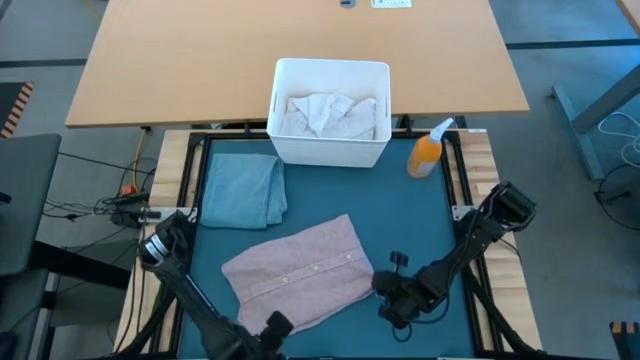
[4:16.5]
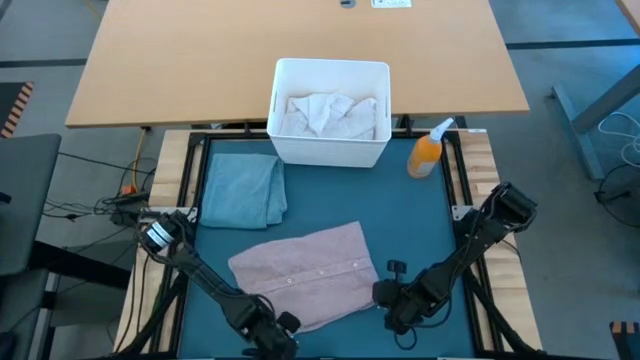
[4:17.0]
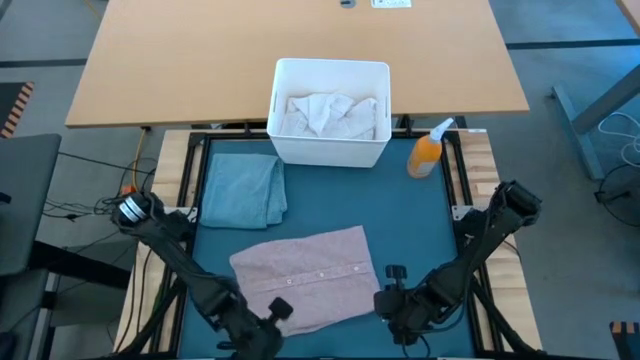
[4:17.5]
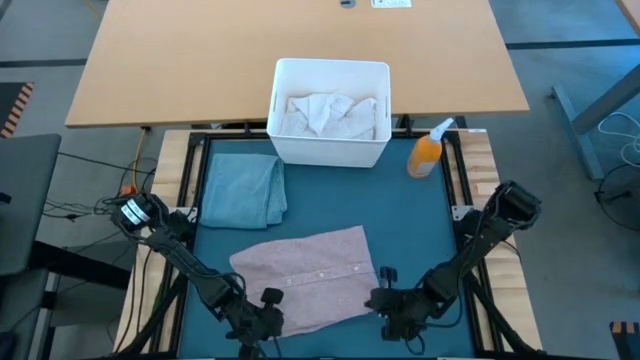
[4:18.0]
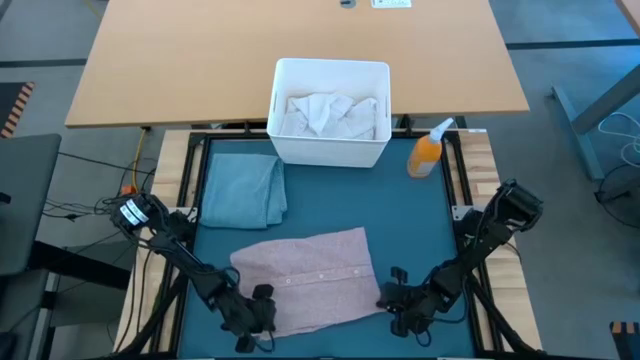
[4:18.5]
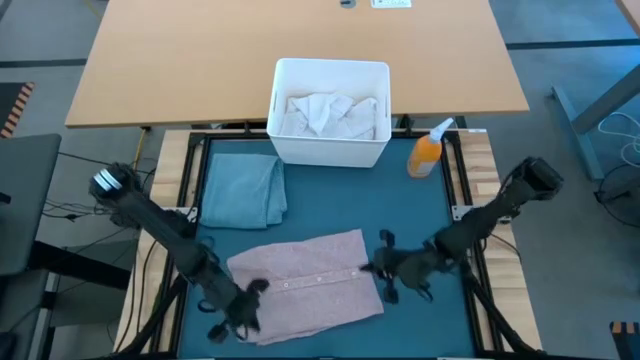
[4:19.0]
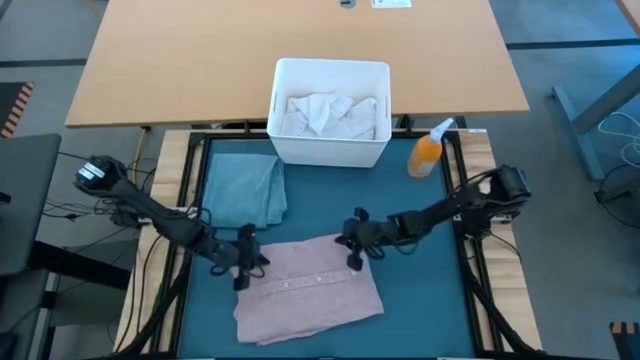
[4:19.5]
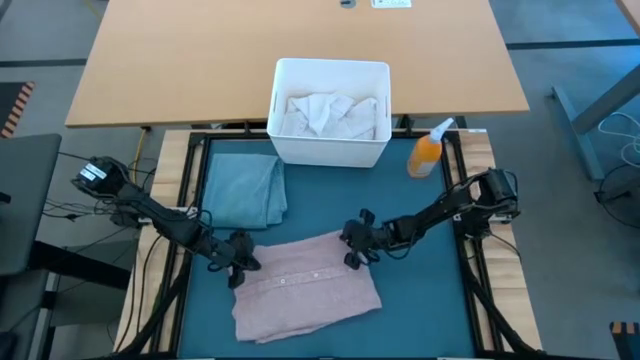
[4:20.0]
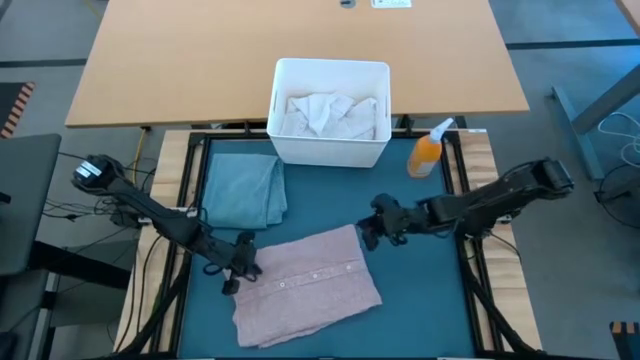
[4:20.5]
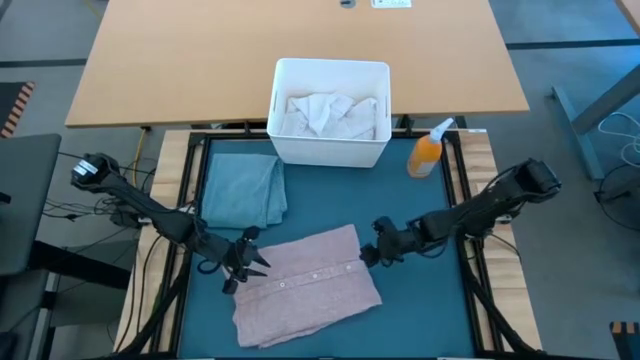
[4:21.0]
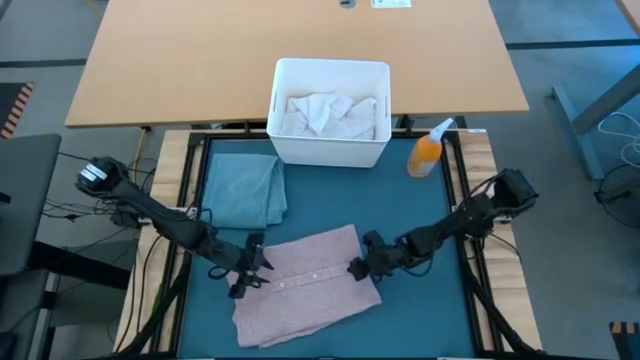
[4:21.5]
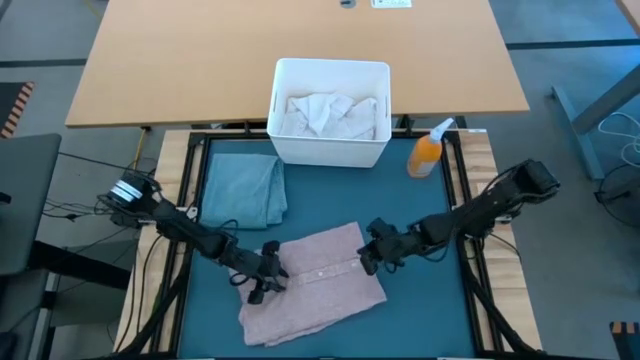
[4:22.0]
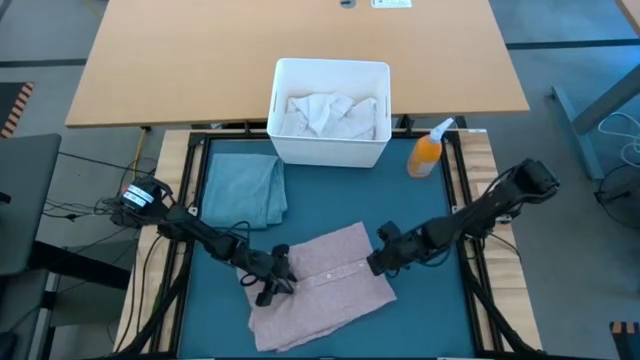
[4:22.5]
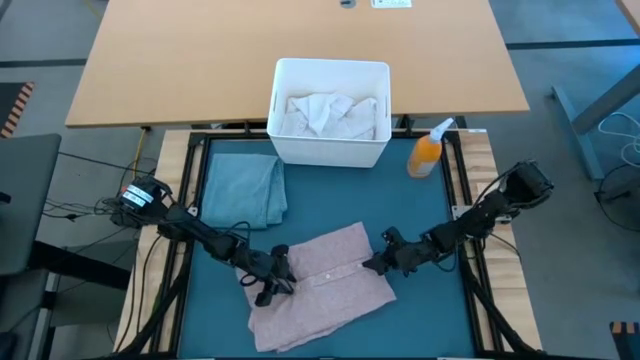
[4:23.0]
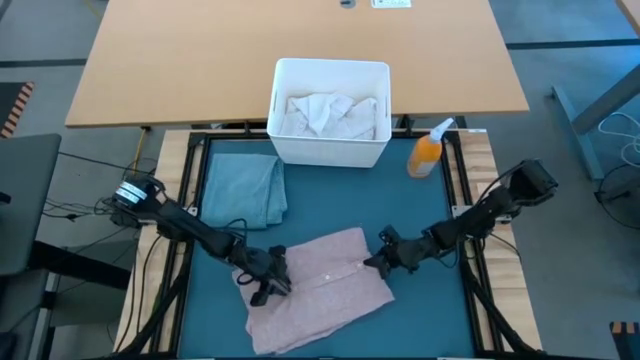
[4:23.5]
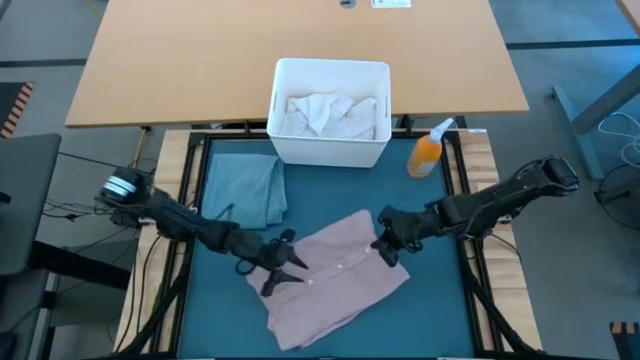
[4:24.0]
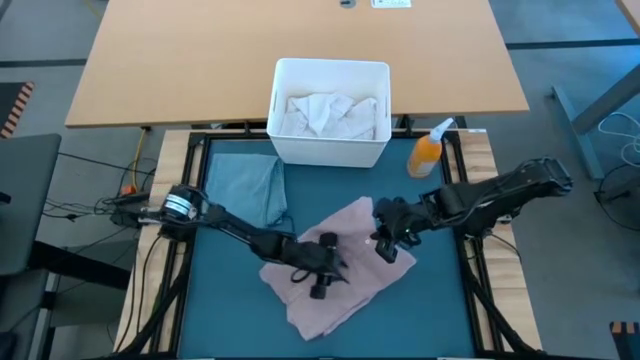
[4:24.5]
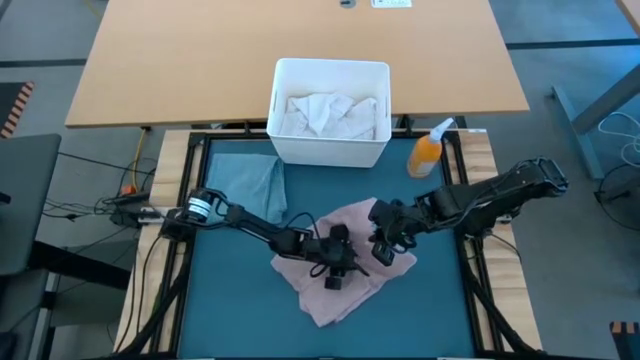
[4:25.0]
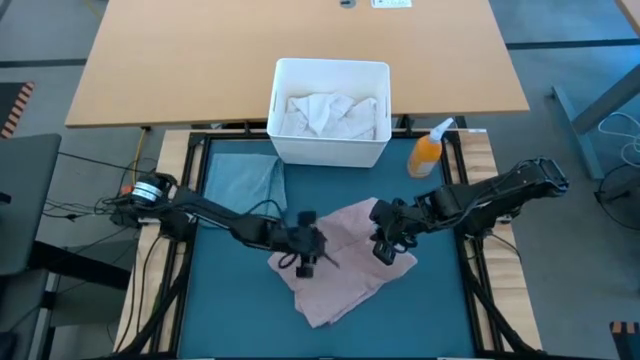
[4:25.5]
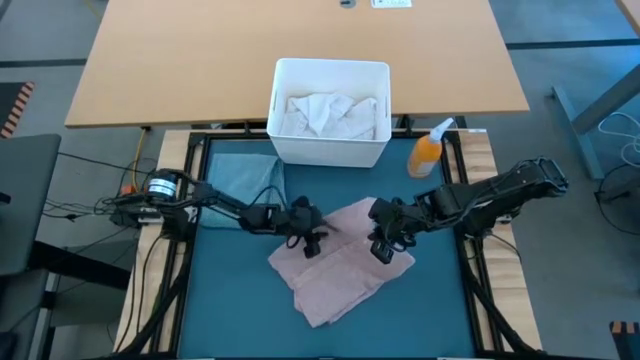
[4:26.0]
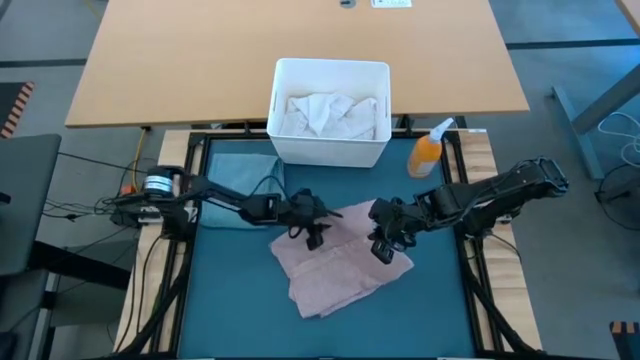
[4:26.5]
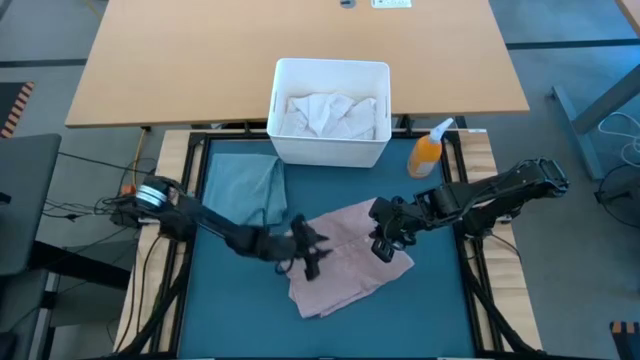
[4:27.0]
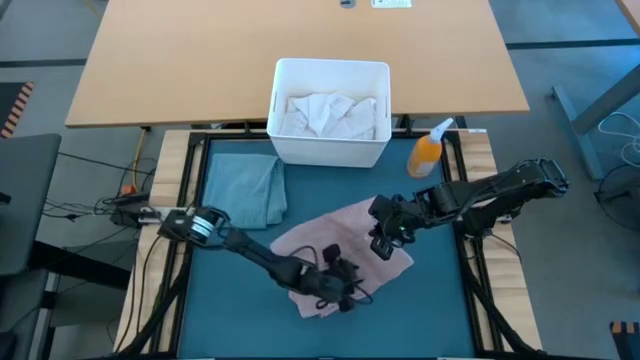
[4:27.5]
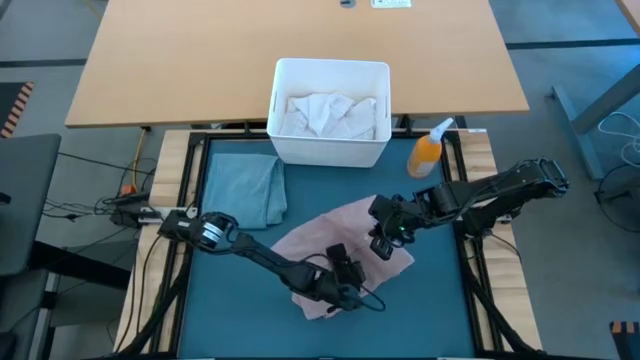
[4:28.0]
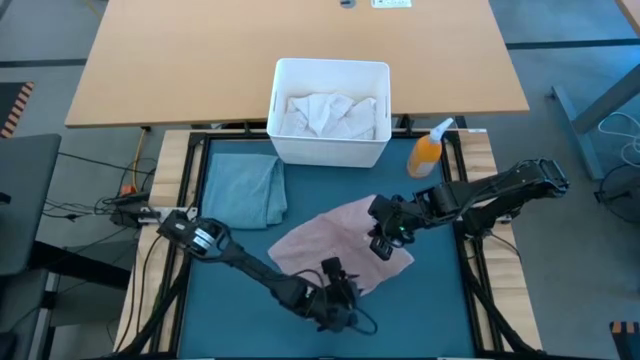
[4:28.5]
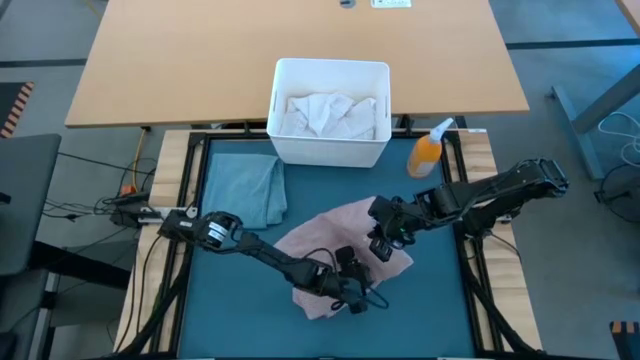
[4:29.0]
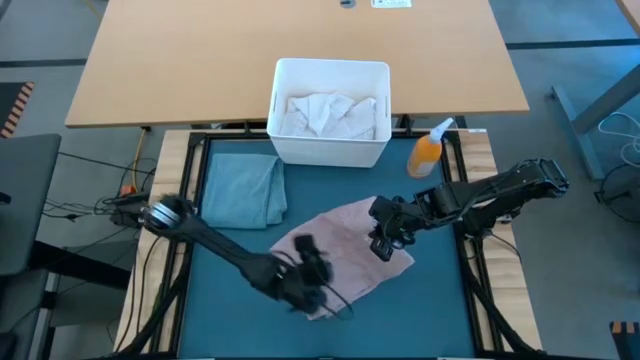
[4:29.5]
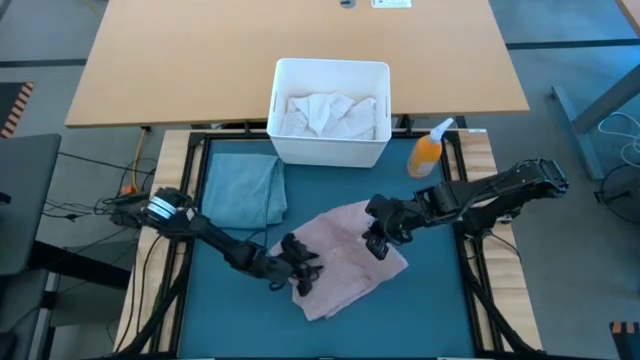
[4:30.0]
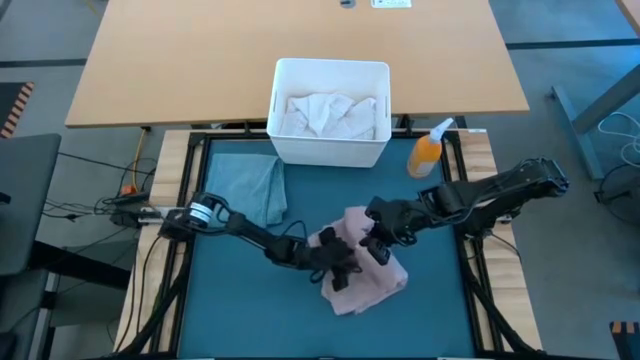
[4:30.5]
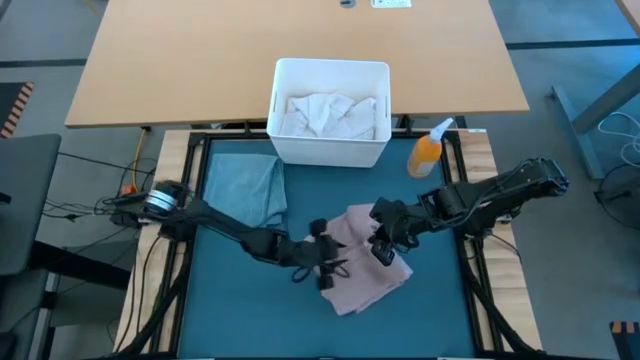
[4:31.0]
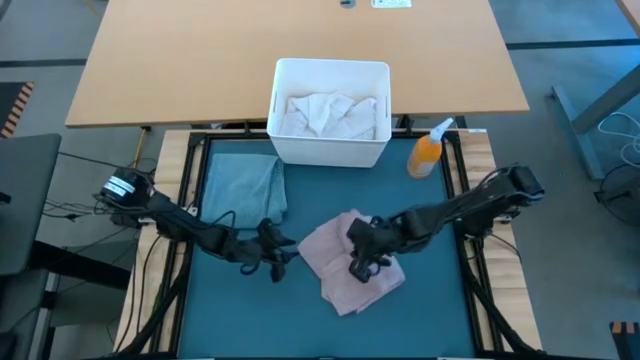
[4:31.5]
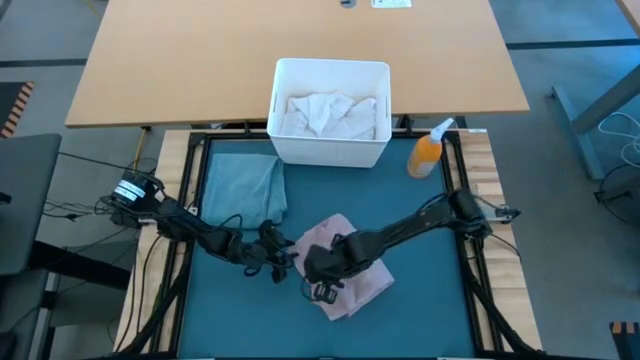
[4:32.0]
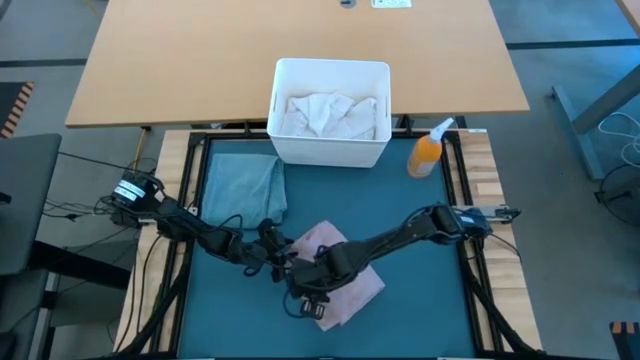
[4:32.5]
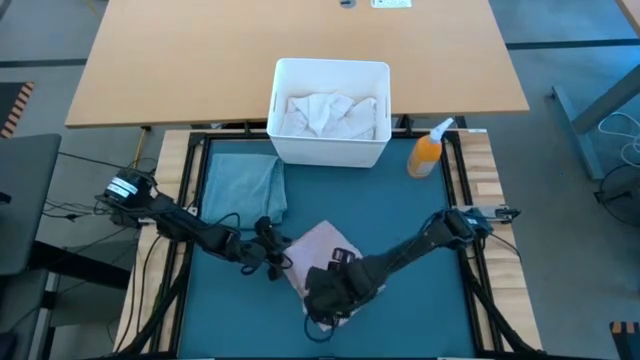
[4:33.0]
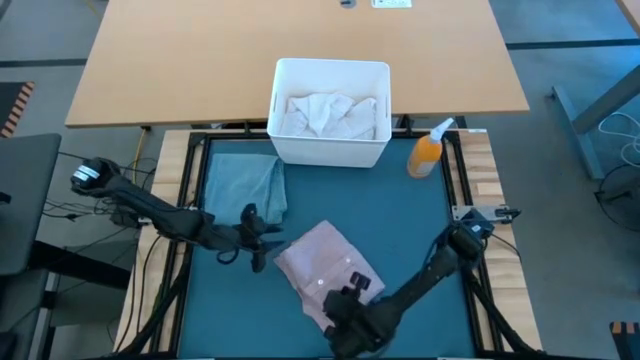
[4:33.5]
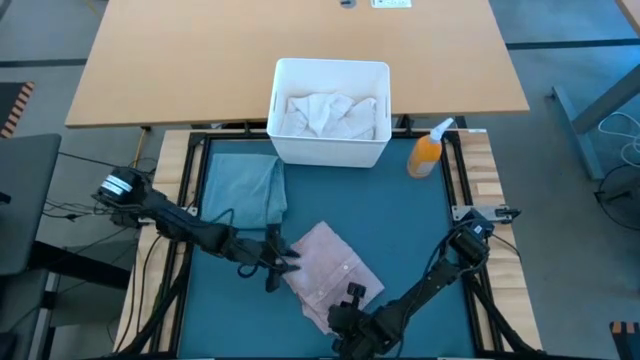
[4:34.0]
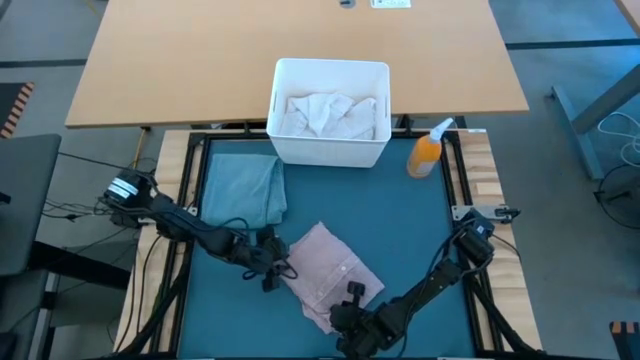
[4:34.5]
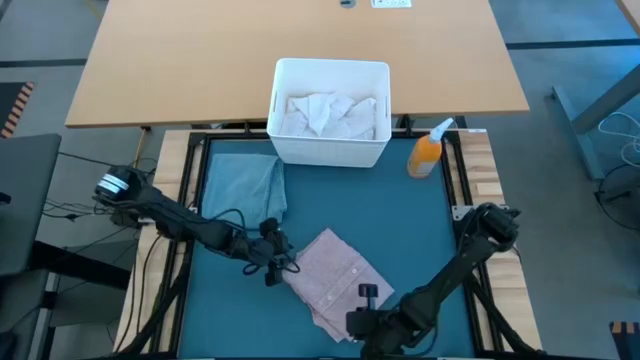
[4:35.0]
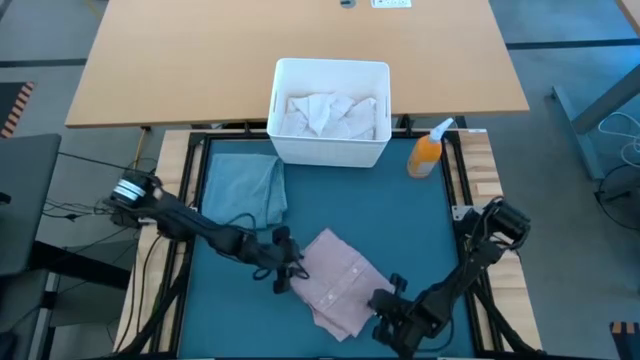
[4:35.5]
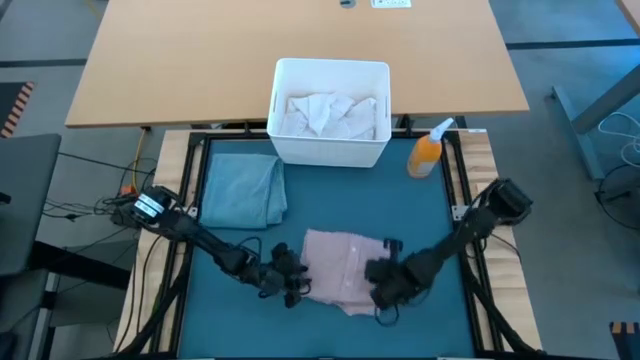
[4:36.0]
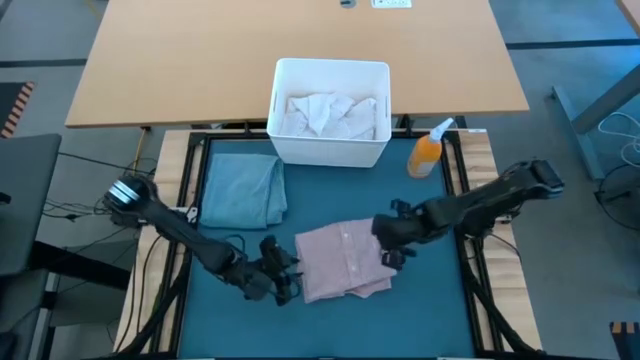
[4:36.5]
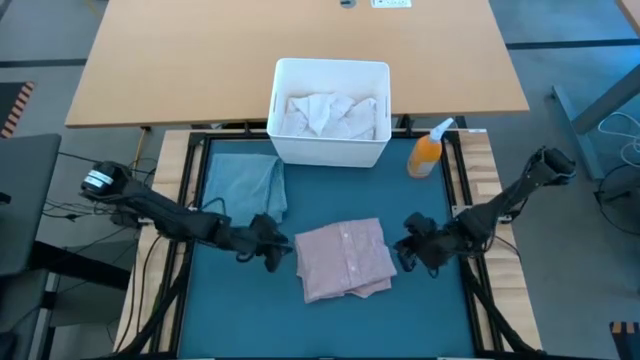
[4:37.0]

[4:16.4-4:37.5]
Task: Fold Laundry from Bin
Fold the pink shirt
